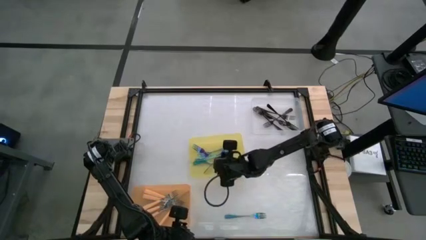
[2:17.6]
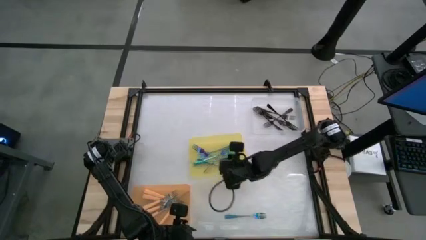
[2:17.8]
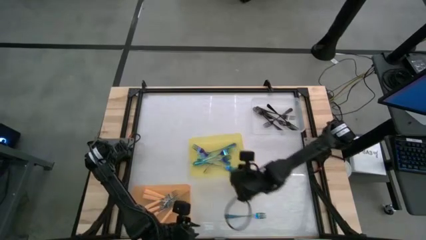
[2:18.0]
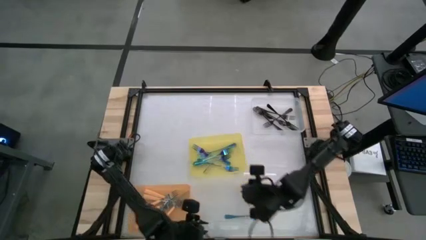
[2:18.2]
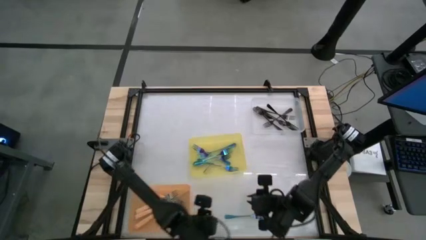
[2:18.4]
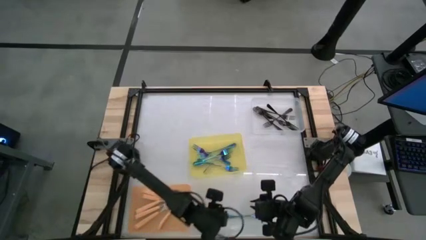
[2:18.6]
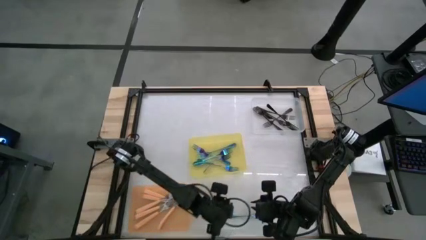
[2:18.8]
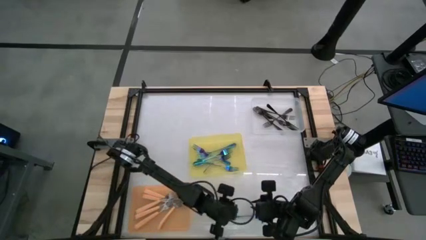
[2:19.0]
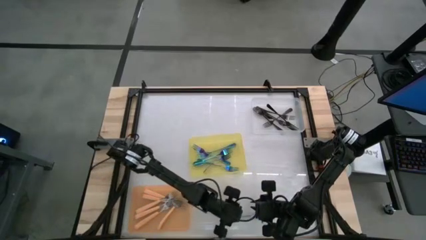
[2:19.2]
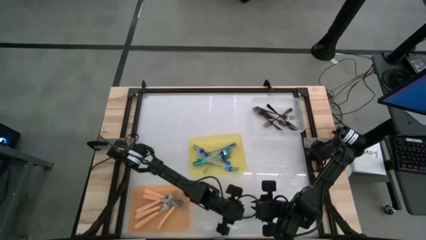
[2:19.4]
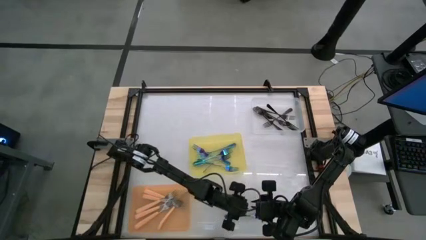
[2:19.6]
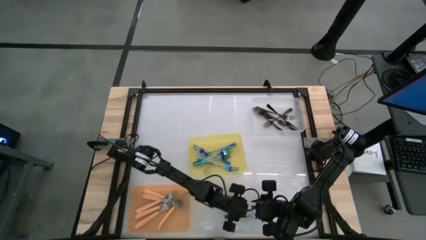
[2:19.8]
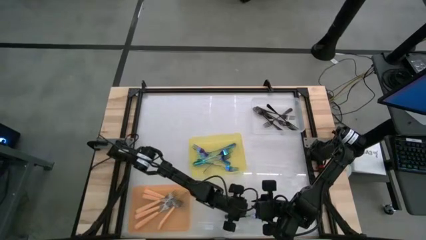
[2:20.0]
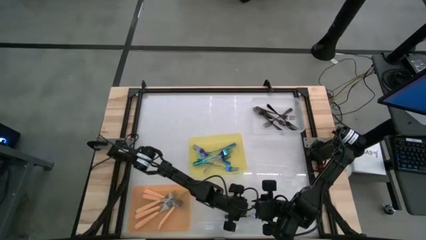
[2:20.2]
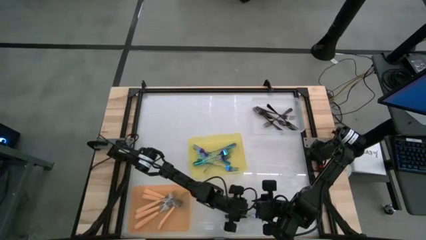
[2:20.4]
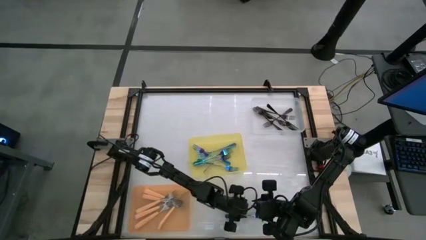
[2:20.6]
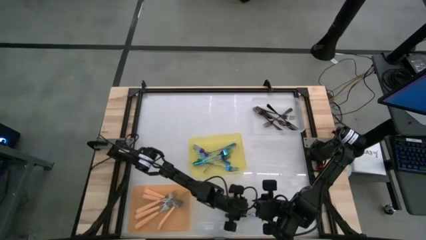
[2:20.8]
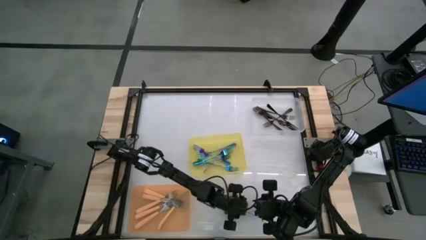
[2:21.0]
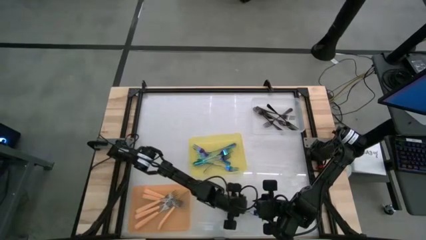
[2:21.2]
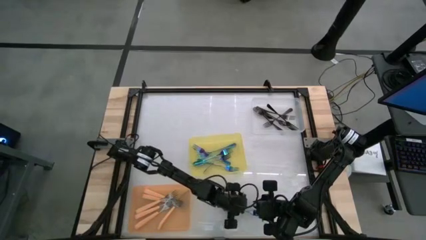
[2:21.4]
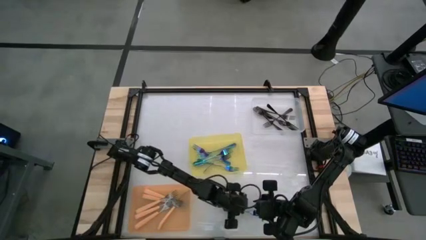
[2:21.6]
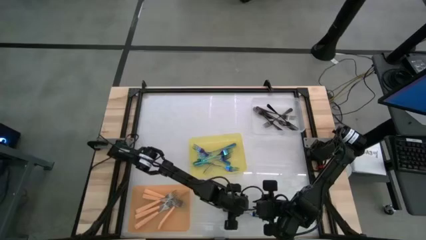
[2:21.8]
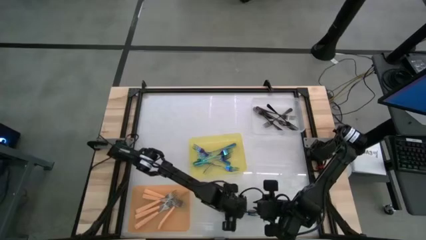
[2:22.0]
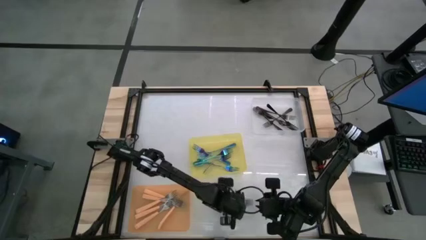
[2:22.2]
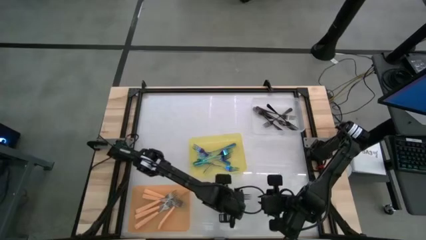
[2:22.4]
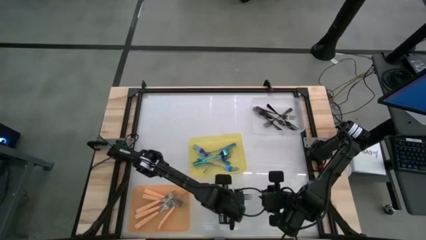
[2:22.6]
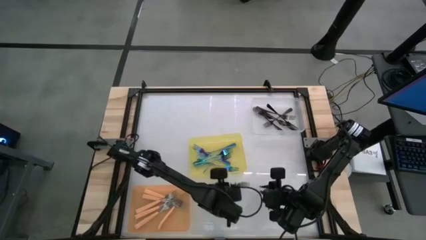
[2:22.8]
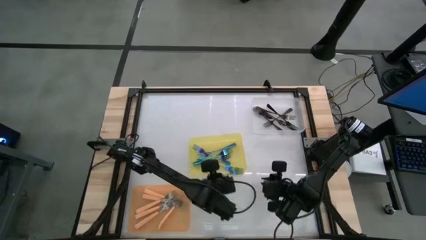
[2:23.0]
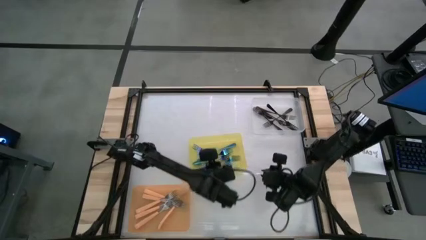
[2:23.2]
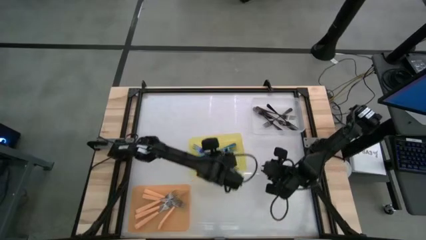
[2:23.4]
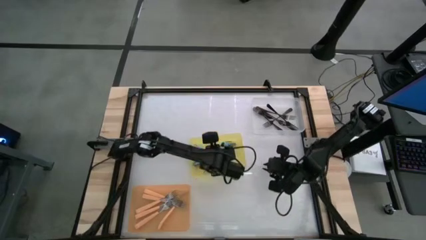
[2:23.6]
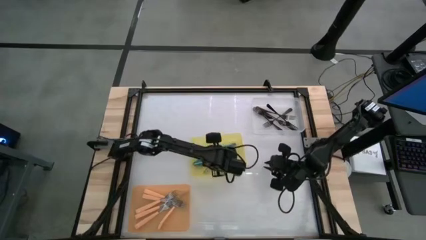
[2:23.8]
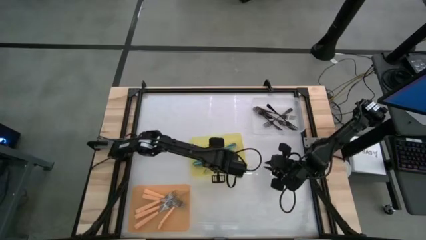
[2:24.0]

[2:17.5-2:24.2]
Task: Sort silverware by color (type)
Put the blue fork into the yellow bin

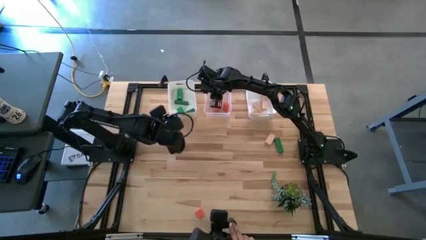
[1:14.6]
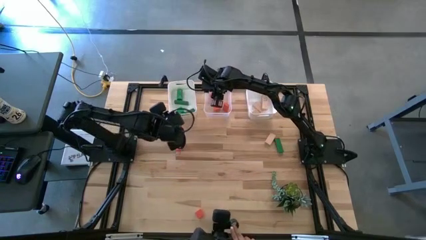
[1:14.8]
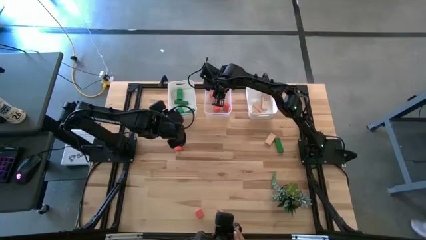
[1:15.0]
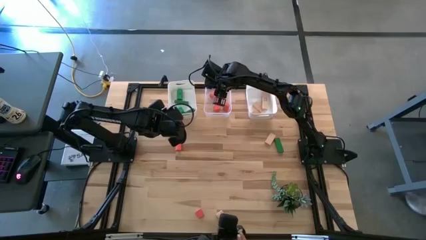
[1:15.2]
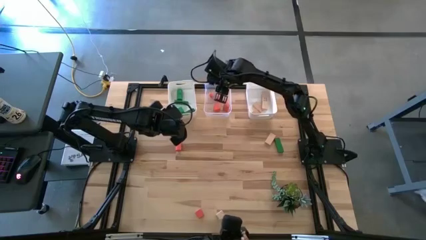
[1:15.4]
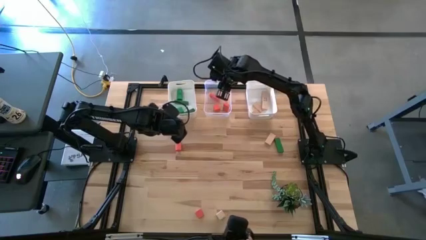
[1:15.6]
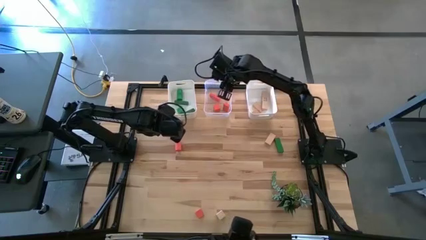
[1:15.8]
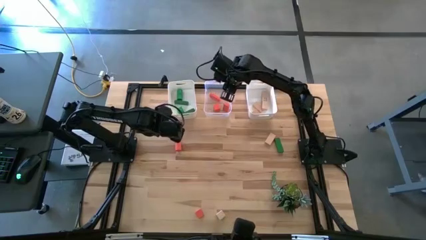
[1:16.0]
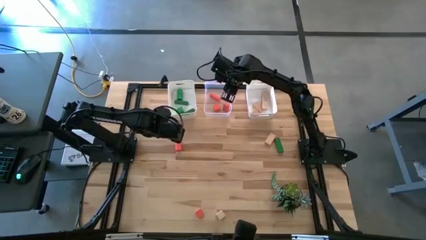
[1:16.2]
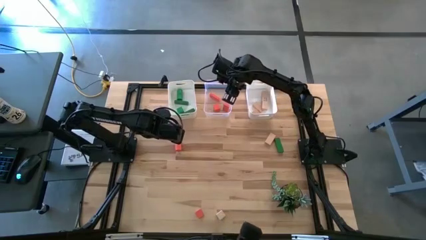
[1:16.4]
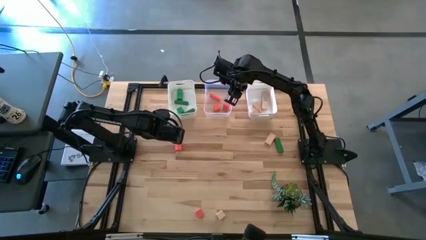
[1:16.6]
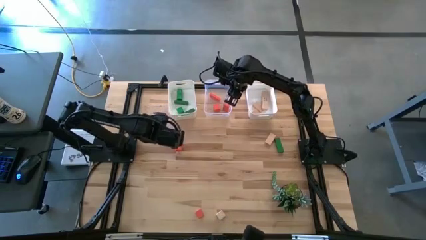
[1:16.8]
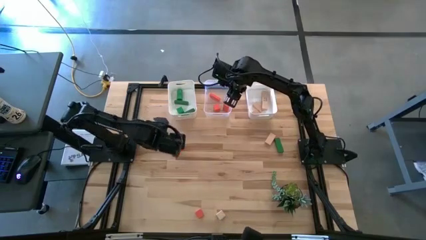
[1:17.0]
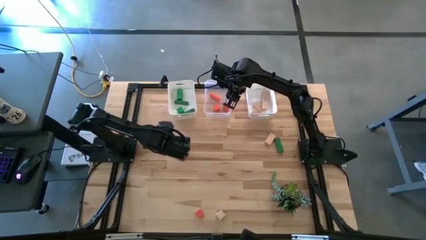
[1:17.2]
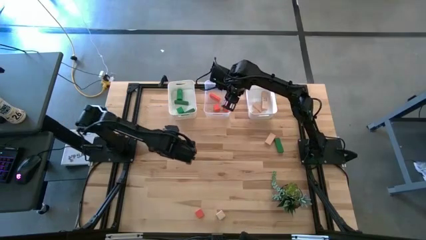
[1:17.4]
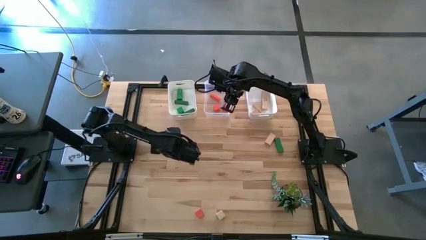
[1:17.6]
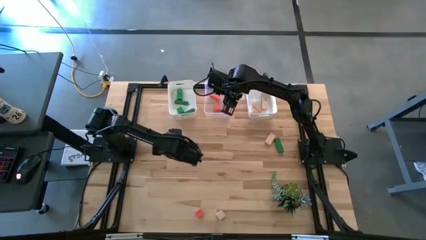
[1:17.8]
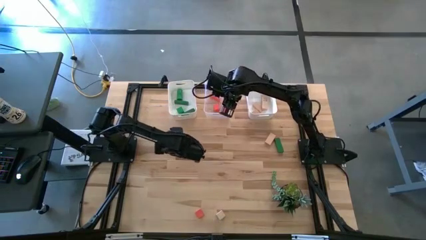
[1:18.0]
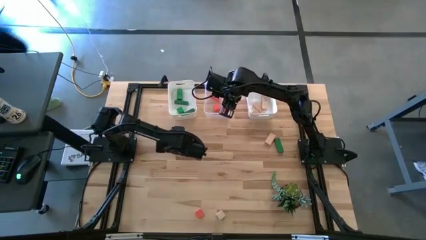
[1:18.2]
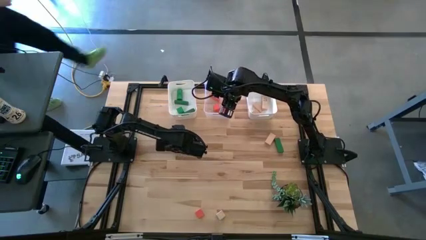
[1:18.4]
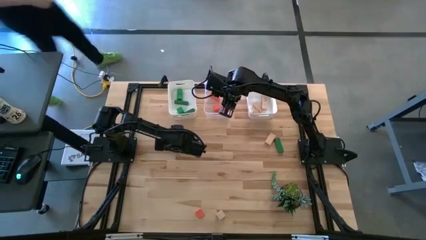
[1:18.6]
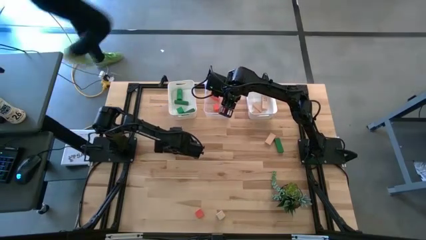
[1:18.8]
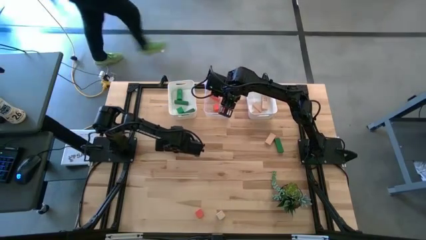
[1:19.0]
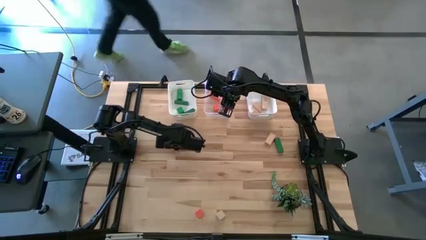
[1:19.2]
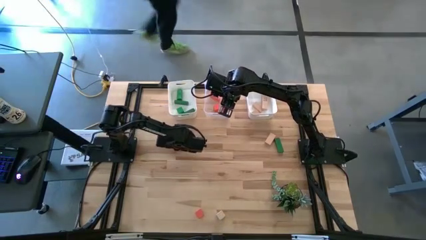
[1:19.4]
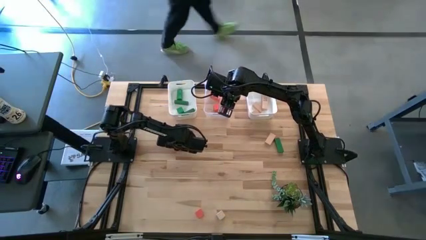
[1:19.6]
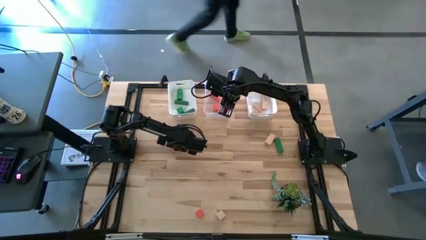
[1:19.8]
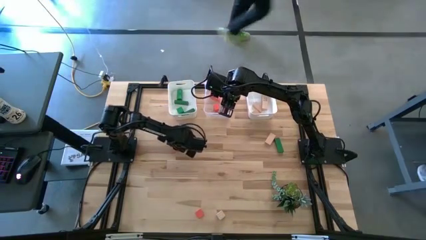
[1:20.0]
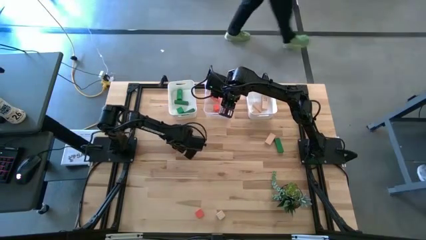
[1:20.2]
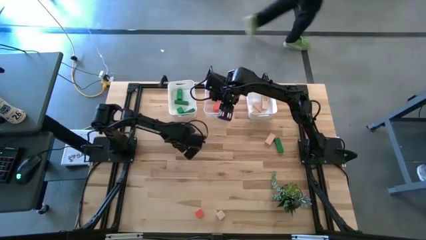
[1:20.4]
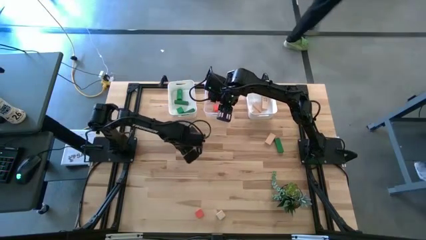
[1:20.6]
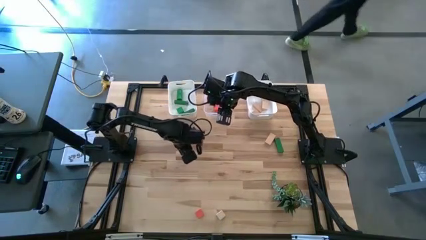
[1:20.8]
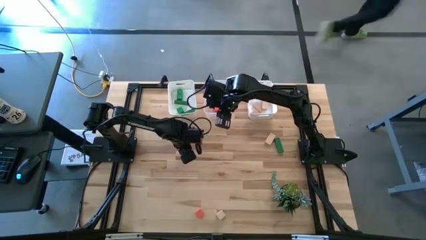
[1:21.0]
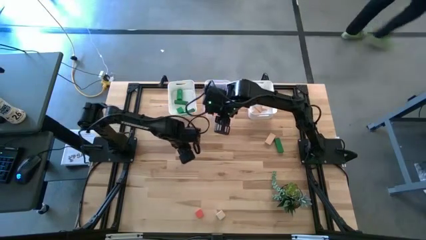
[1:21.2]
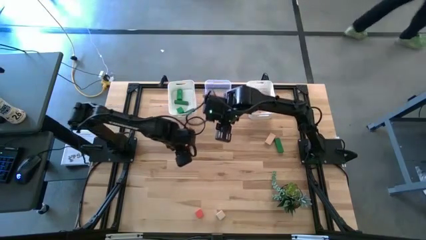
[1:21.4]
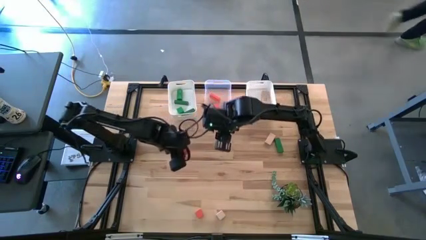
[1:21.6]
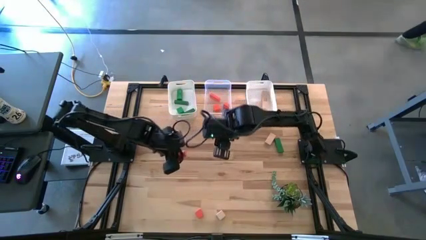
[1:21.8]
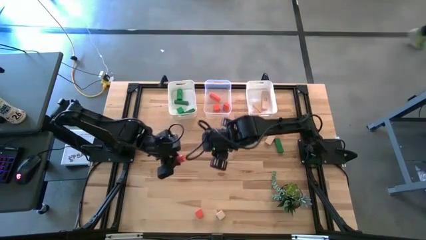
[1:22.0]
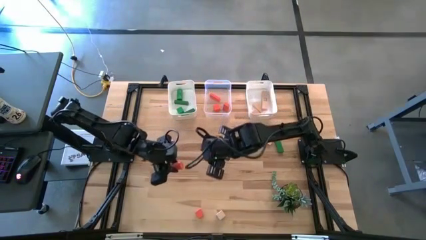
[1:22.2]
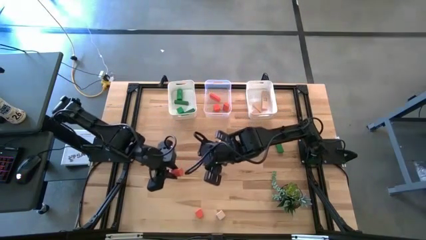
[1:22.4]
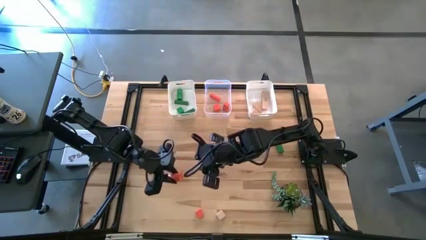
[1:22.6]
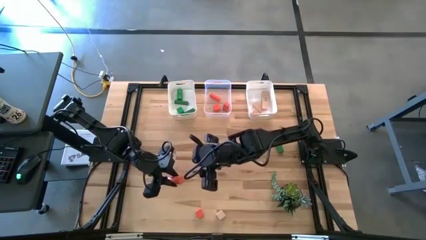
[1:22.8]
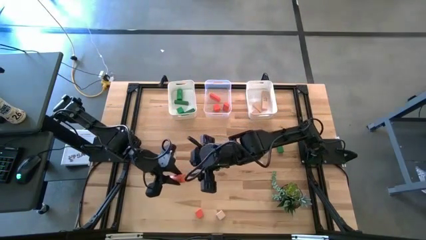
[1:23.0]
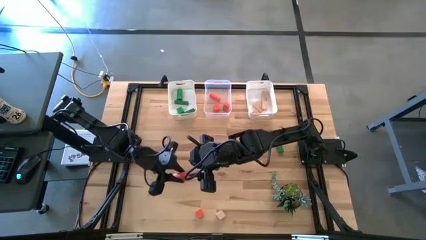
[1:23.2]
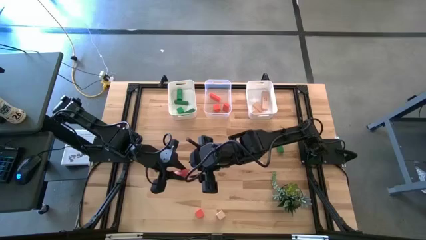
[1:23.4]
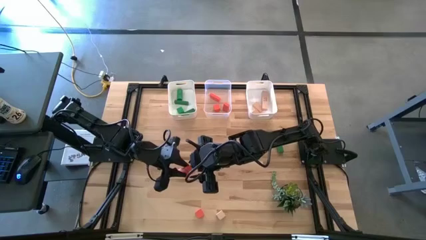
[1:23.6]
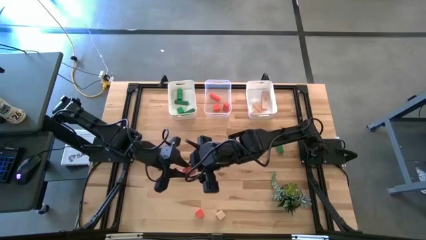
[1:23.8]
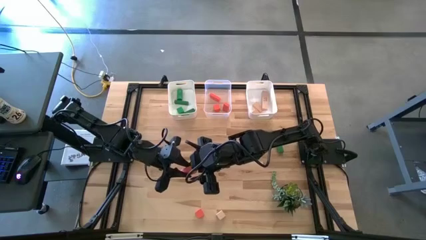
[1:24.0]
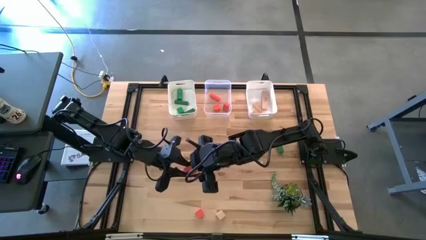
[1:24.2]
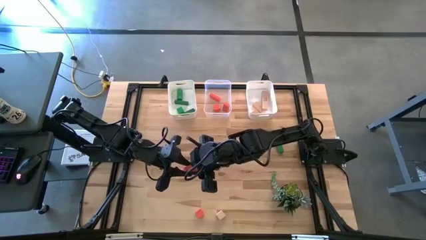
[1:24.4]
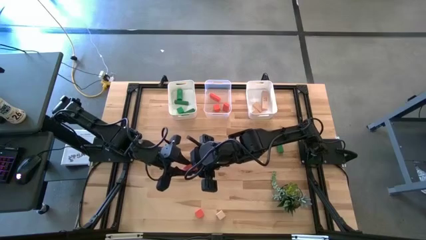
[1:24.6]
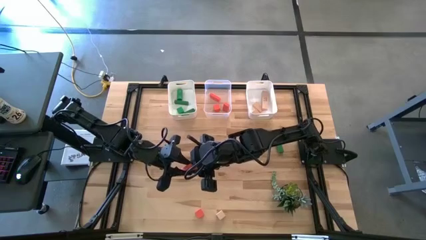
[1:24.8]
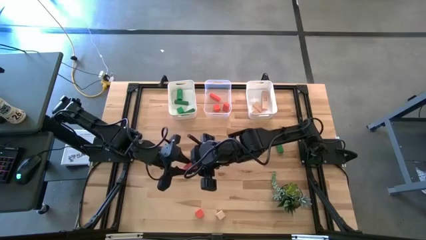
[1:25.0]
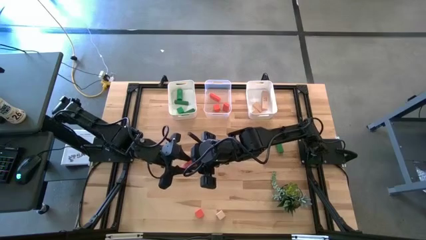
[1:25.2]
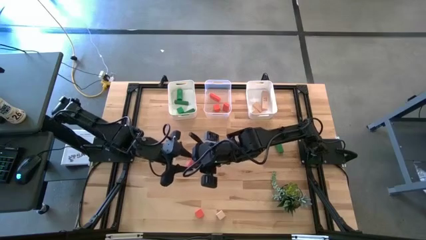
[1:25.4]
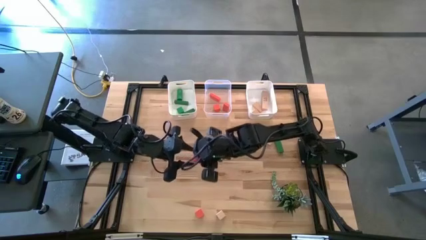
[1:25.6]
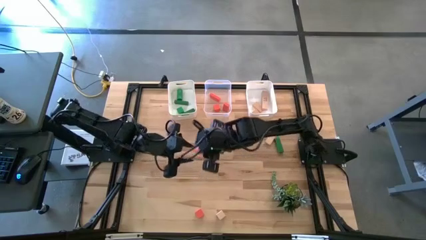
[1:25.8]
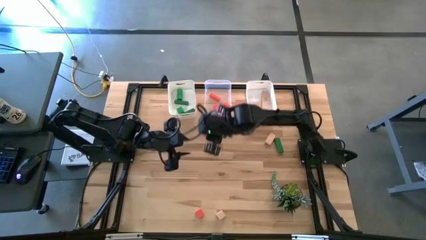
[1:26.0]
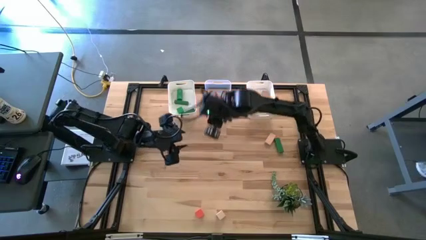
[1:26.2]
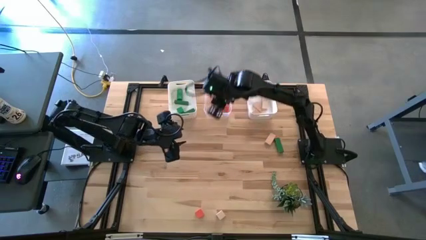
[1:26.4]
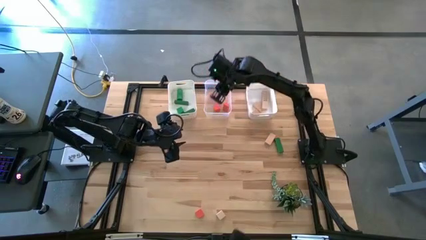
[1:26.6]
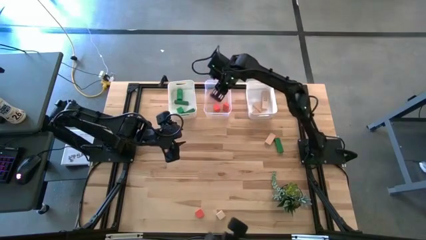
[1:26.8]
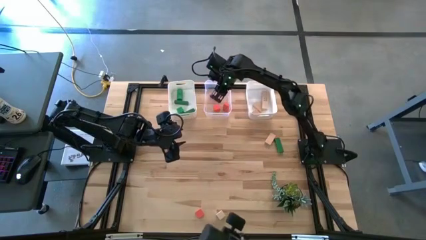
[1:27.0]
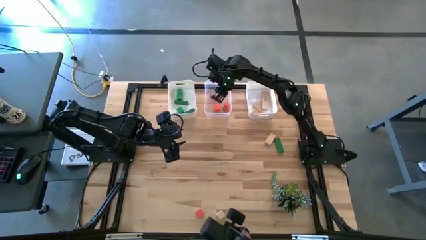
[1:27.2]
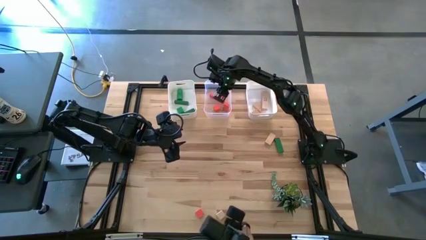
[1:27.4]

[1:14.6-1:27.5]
Task: Sort & place blocks by color
Put the orange block into the transparent bin
